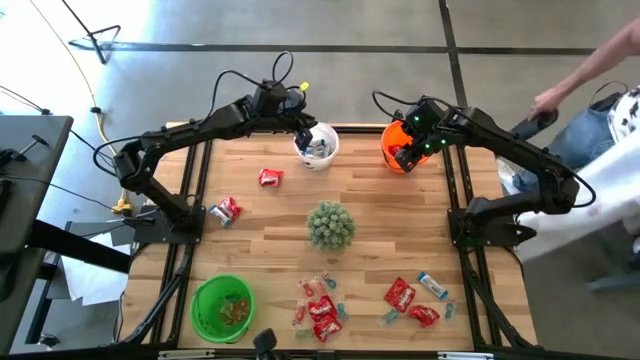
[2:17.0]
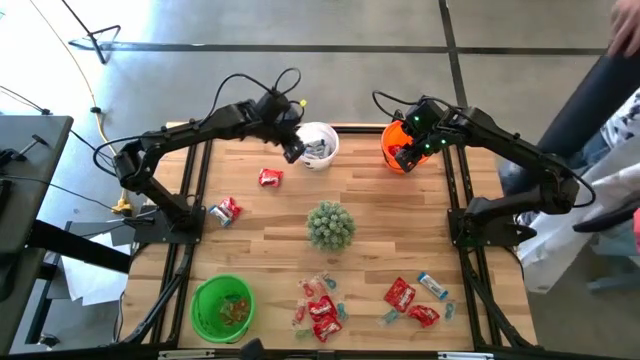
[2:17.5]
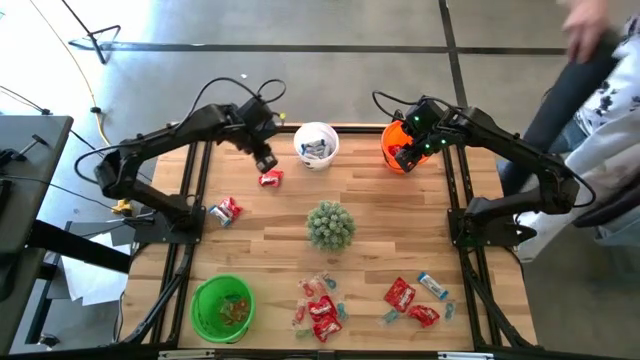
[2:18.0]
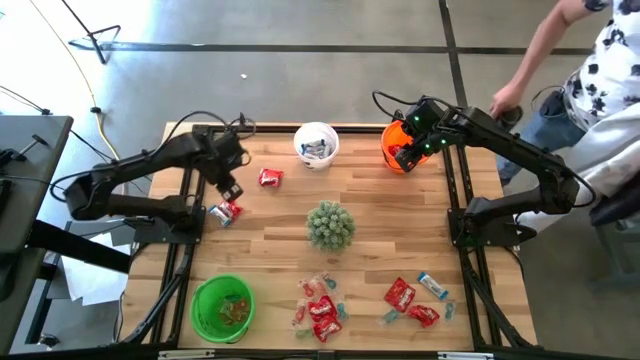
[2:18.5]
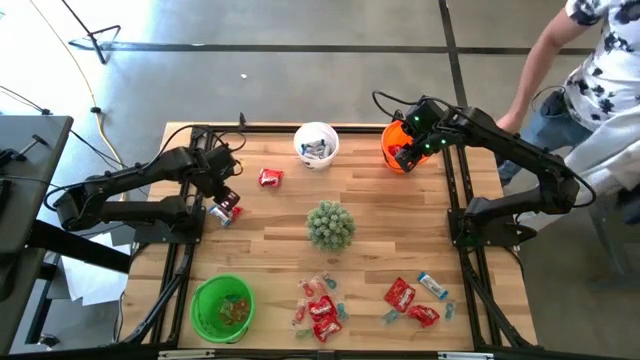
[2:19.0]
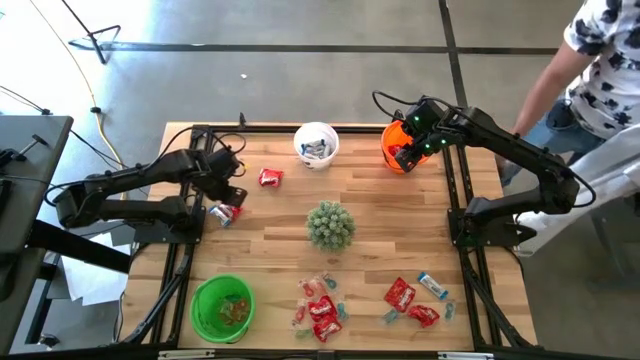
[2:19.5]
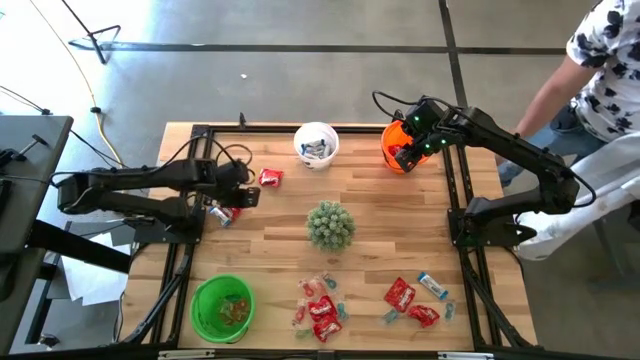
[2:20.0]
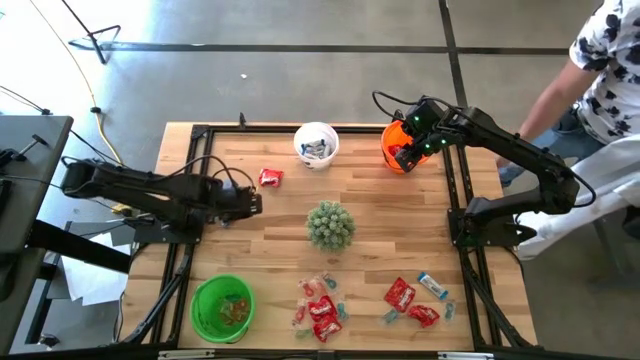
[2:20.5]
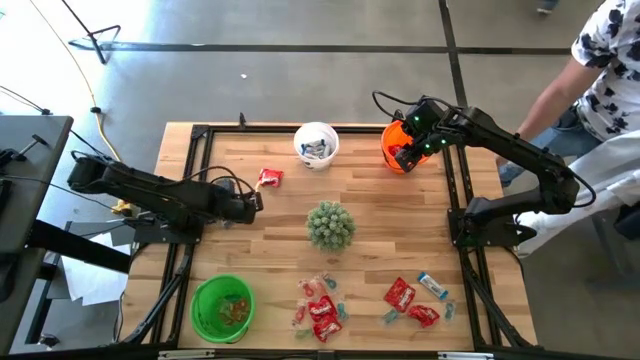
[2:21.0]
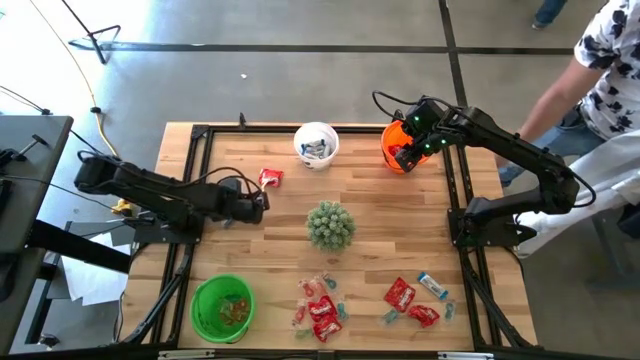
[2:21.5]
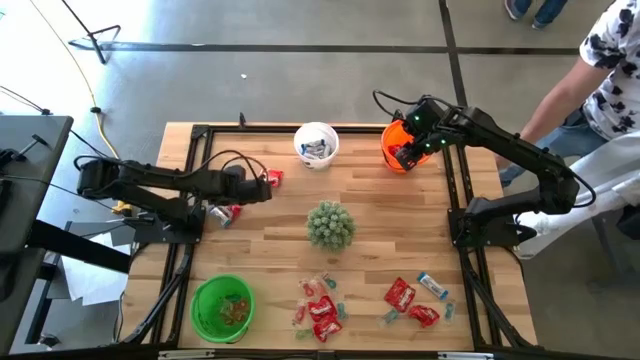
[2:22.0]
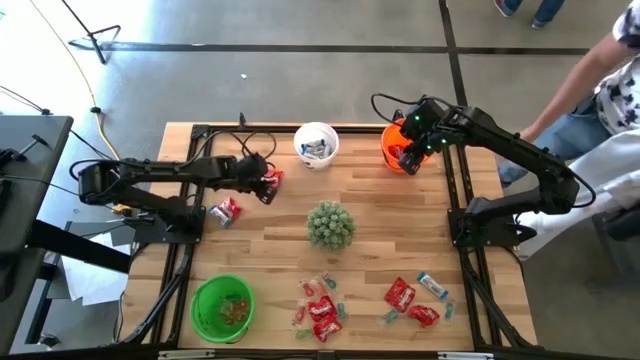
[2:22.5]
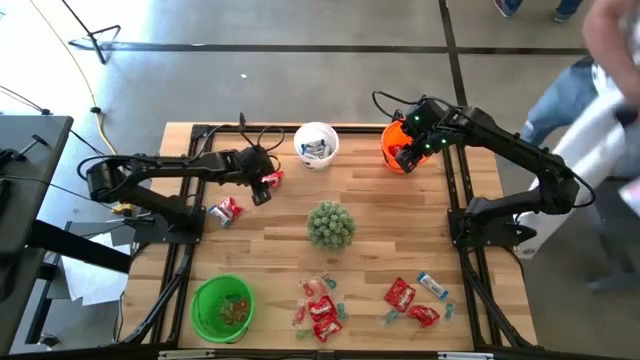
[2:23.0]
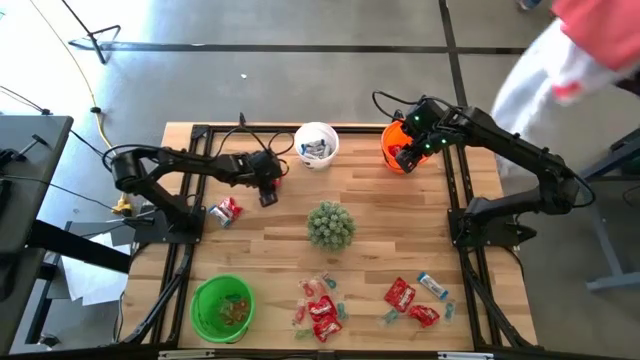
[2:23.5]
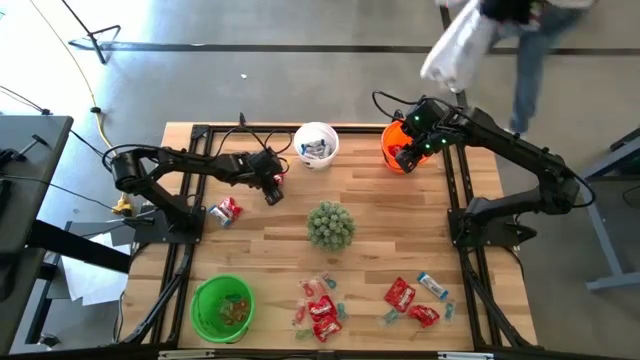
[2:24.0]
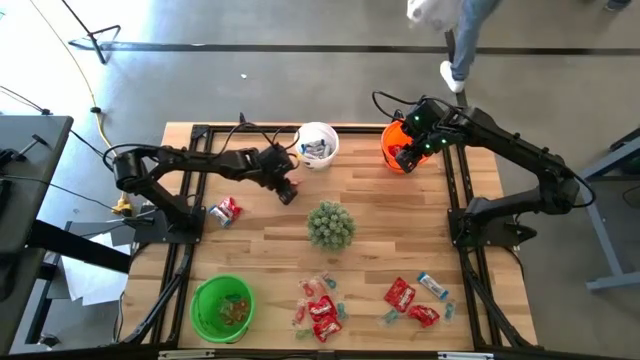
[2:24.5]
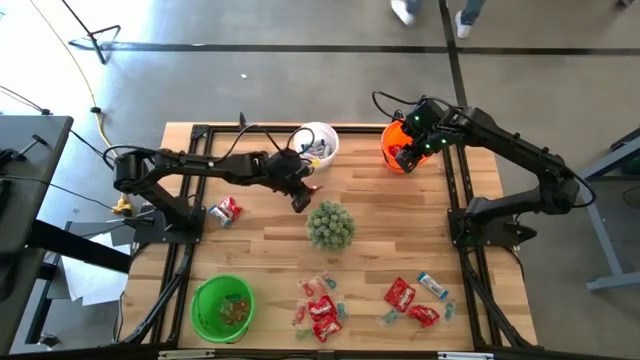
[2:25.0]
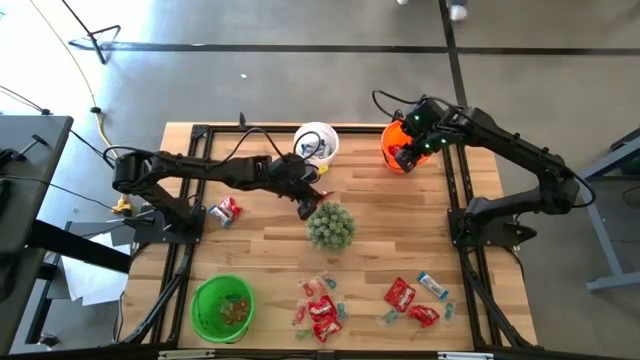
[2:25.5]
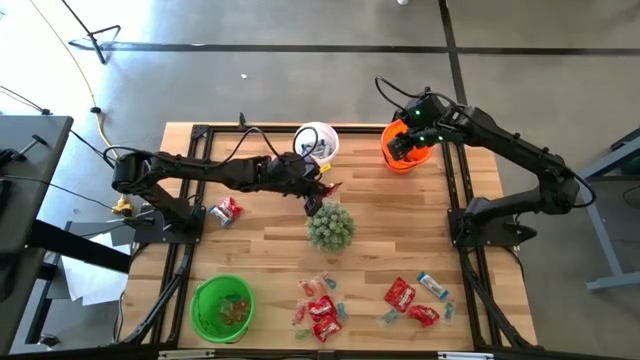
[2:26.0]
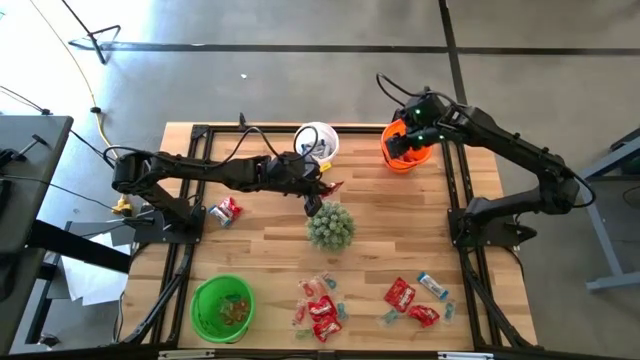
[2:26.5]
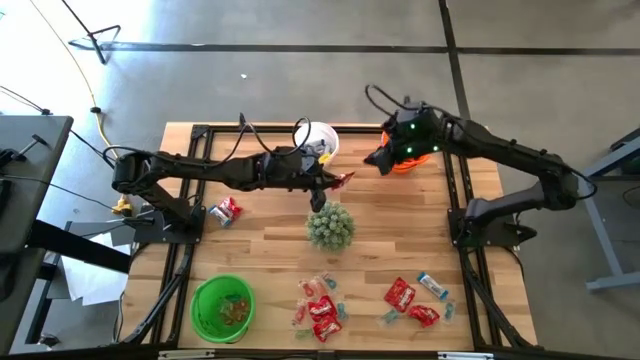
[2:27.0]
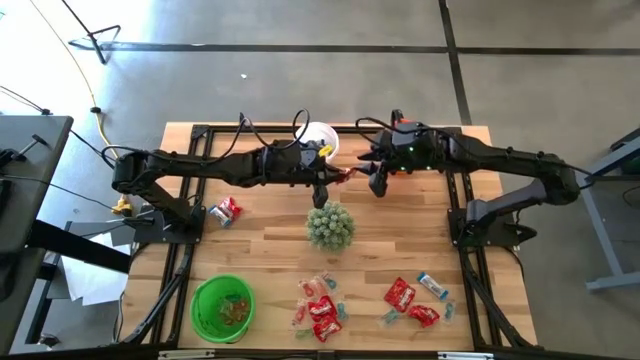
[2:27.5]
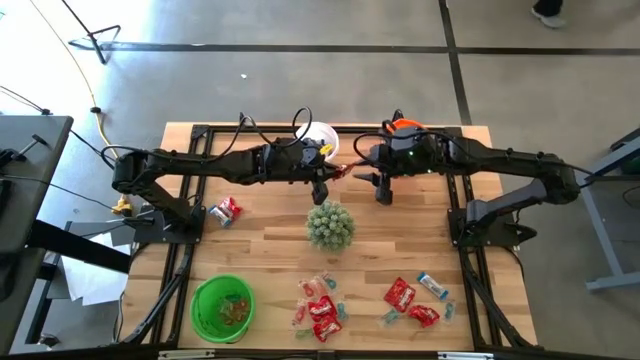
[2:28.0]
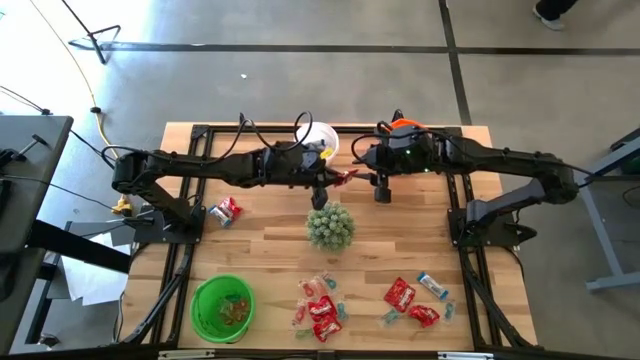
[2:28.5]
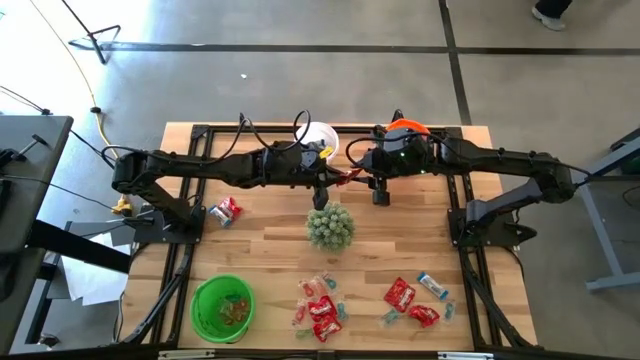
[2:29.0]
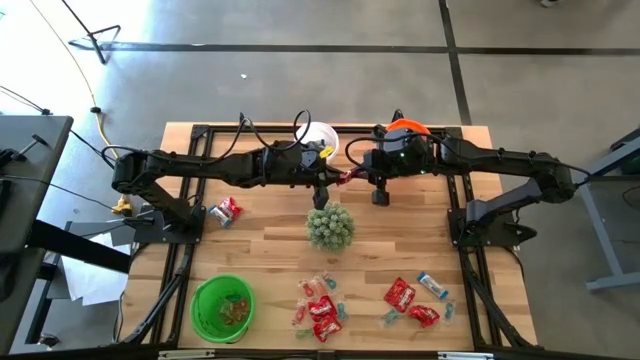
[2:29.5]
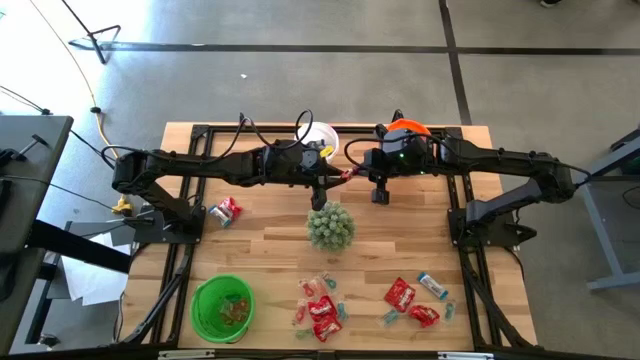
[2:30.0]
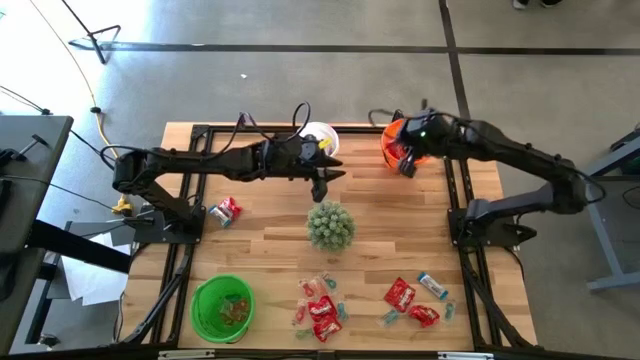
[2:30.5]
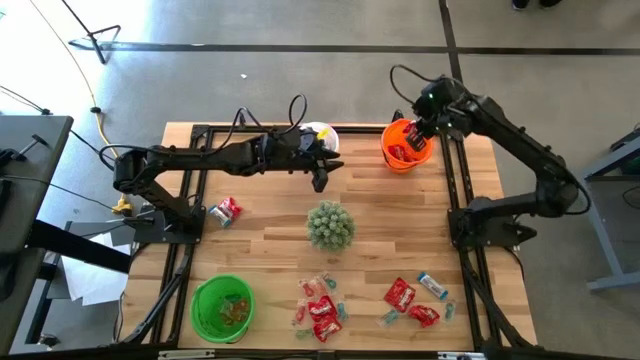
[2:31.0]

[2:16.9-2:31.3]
Task: Sort candy
Put the red candy into the orange bucket

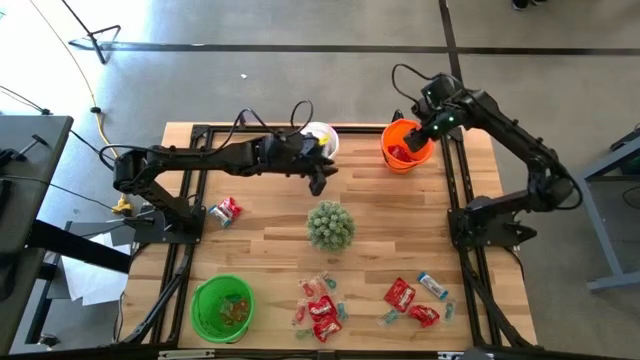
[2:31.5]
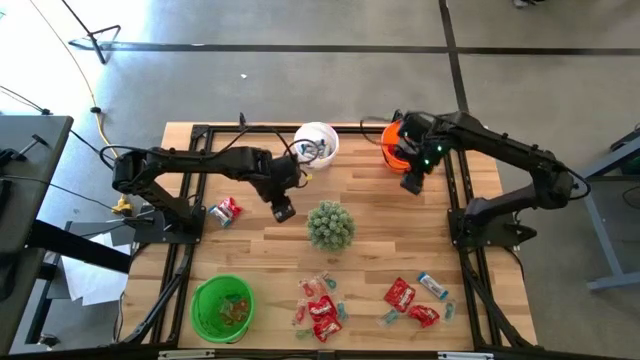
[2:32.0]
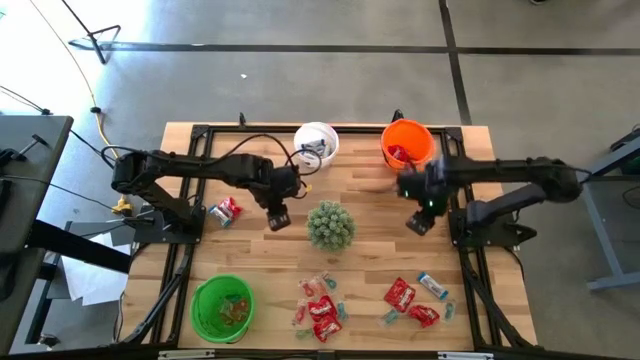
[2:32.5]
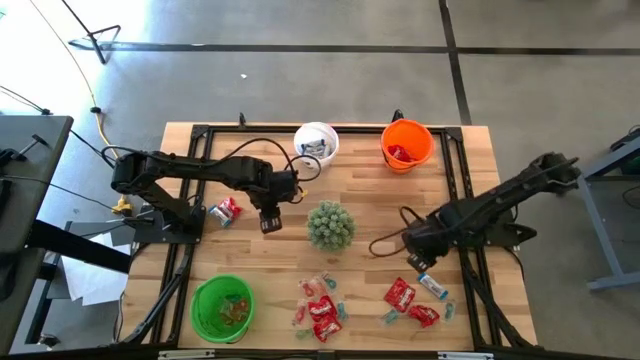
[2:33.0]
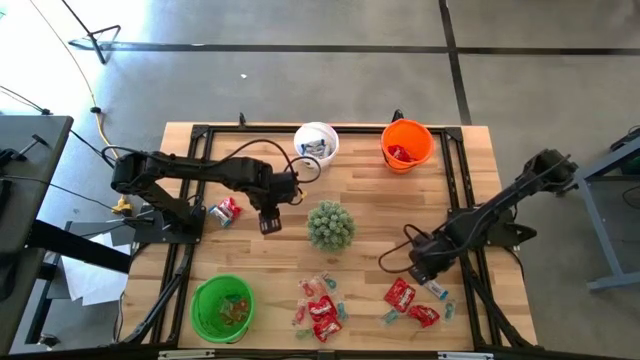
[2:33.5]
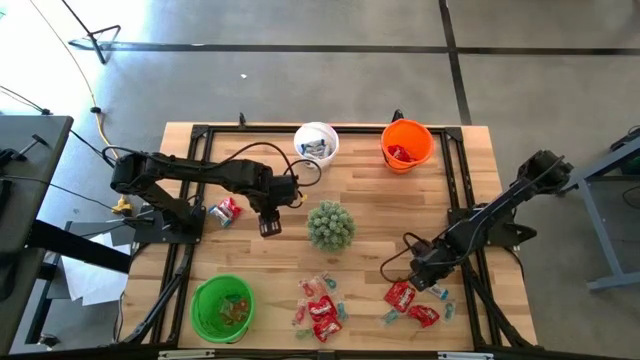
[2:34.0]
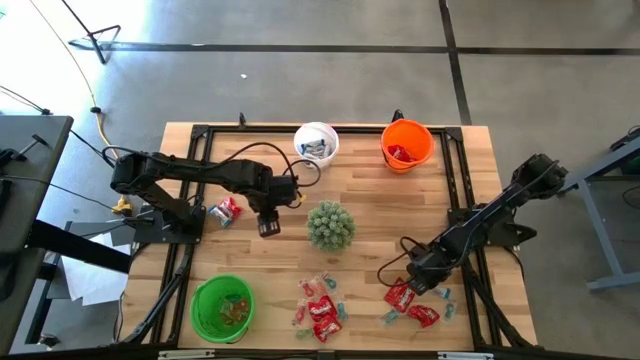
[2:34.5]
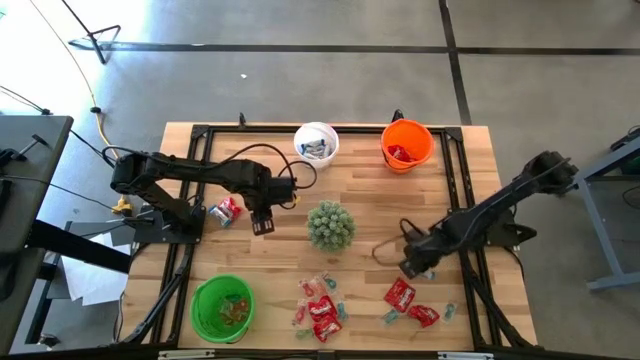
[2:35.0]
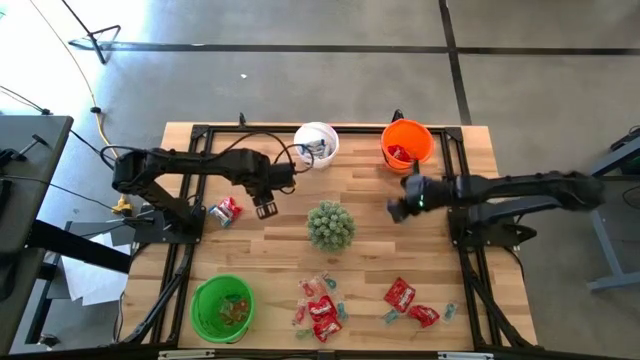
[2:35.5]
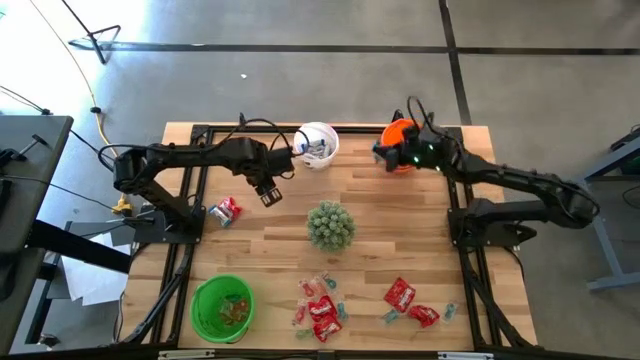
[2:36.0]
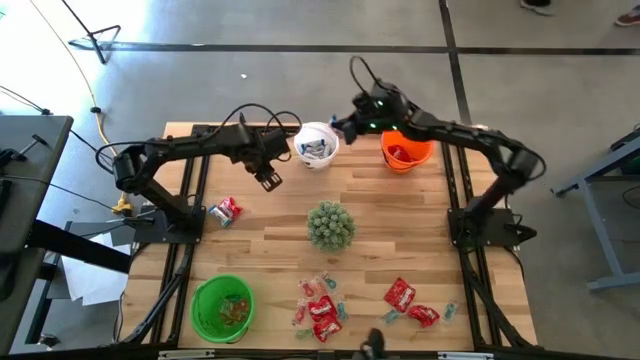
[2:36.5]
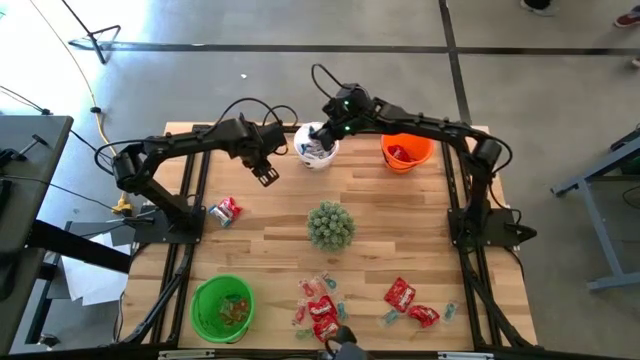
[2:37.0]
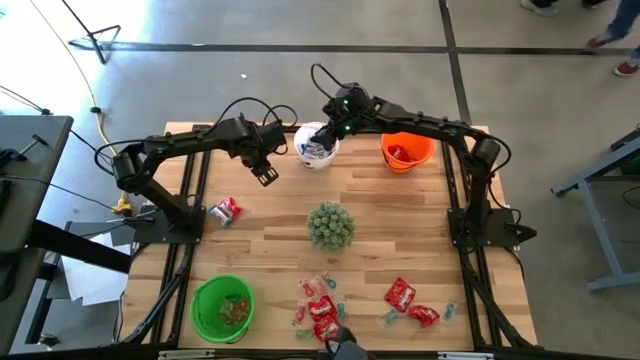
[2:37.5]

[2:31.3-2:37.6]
Put the white chocolate into the white bucket

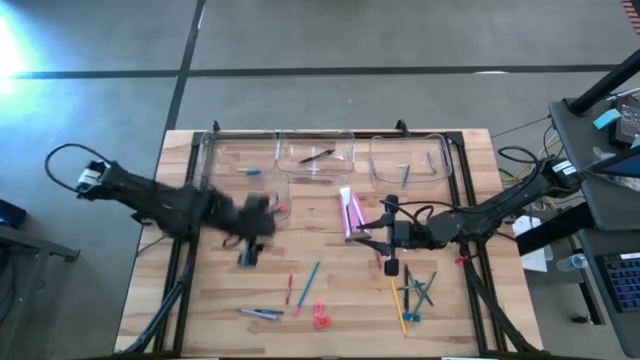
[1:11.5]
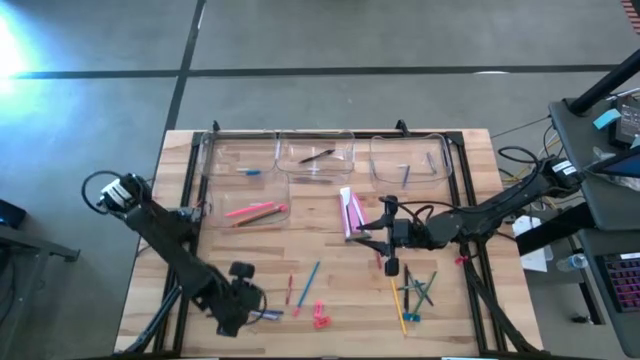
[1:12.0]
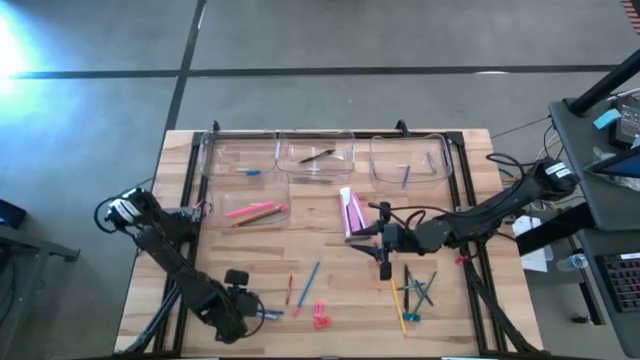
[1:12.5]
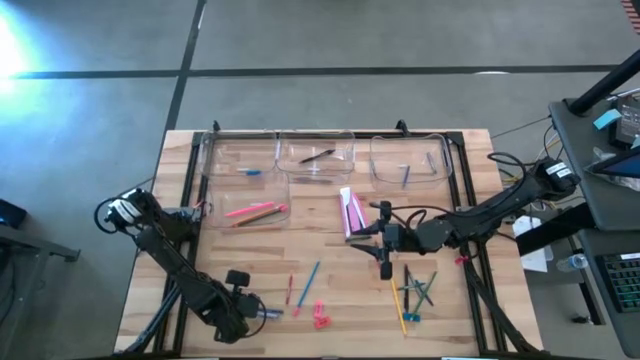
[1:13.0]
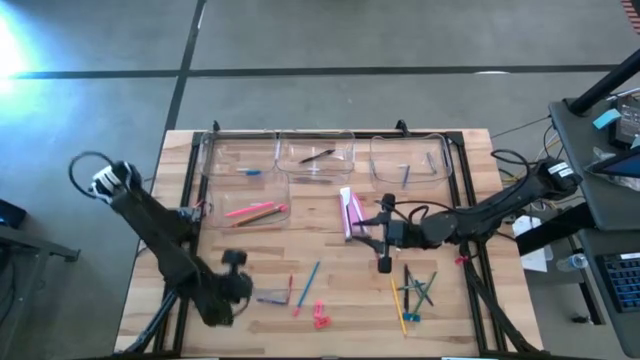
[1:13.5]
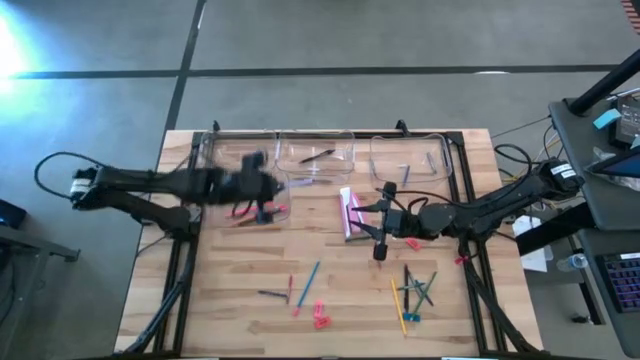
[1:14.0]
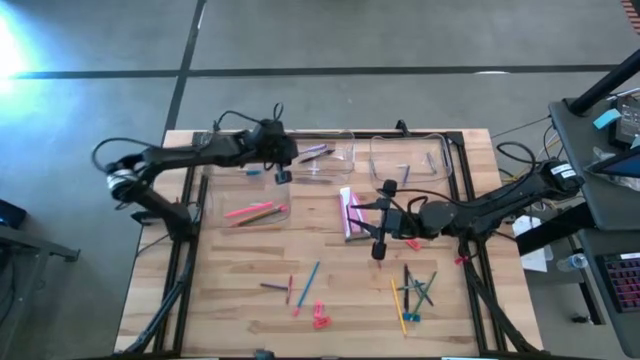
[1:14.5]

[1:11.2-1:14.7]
Task: Sort crayons/erasers/pens/pencils in bins
Put the light blue pen into the top middle transparent bin
